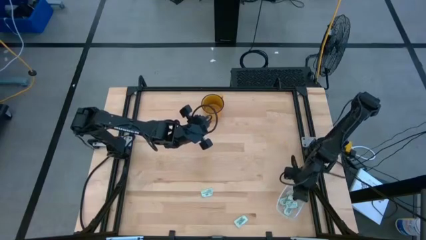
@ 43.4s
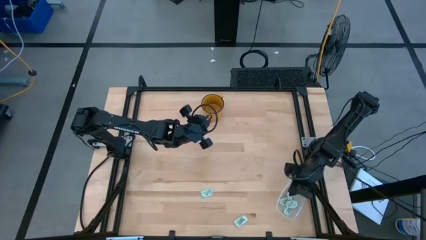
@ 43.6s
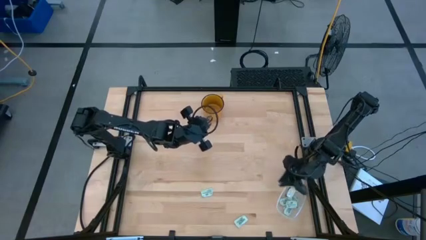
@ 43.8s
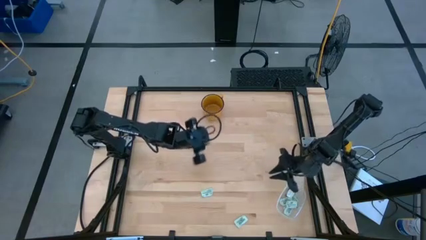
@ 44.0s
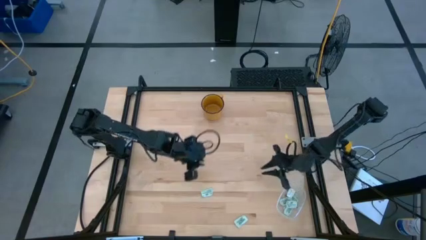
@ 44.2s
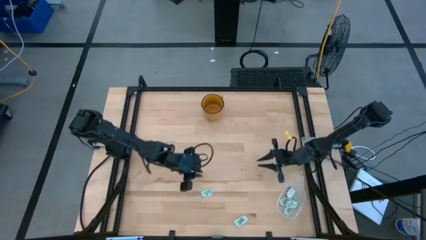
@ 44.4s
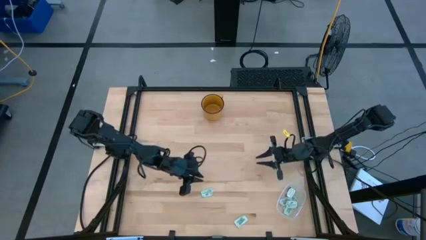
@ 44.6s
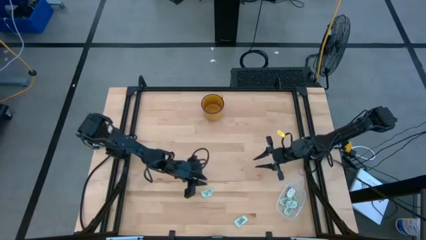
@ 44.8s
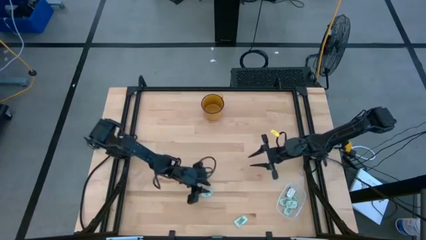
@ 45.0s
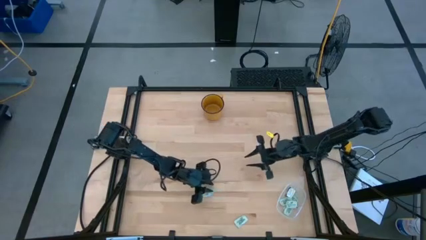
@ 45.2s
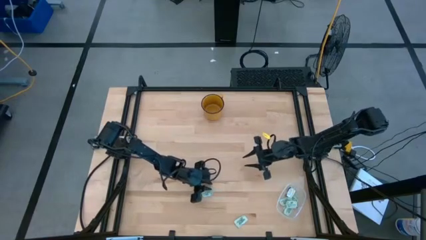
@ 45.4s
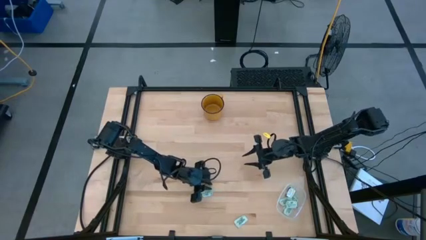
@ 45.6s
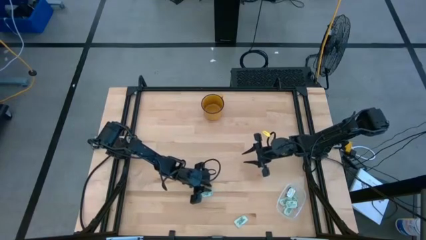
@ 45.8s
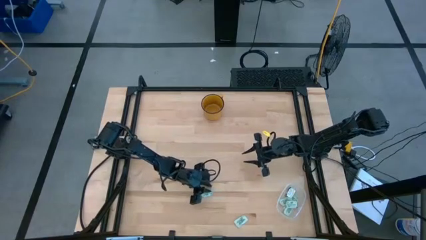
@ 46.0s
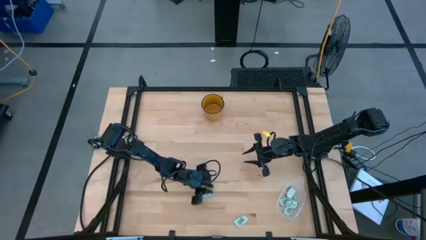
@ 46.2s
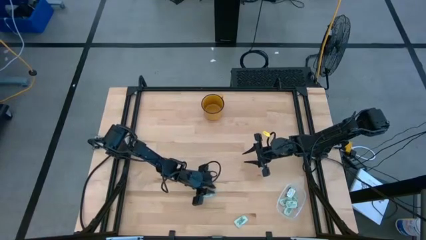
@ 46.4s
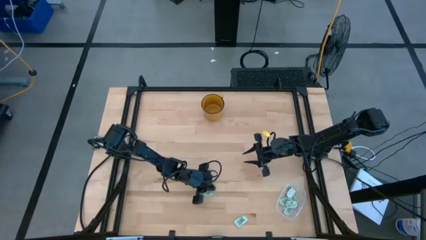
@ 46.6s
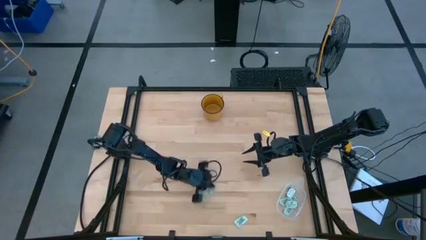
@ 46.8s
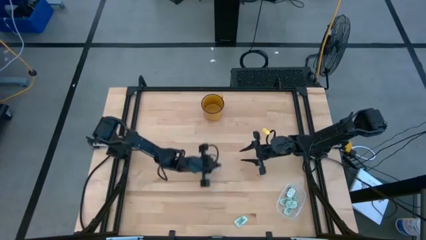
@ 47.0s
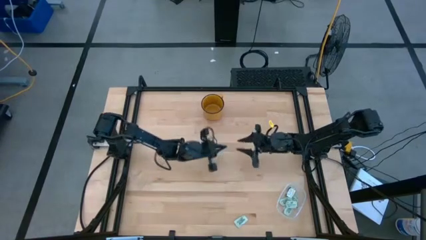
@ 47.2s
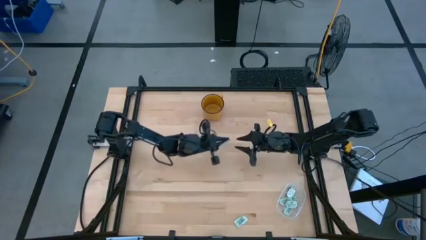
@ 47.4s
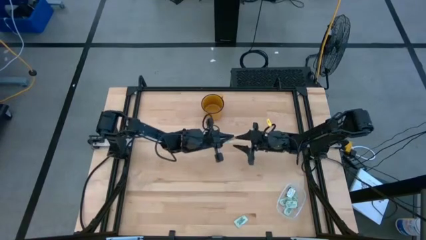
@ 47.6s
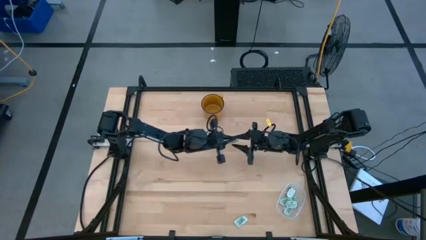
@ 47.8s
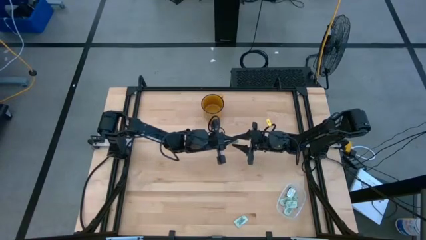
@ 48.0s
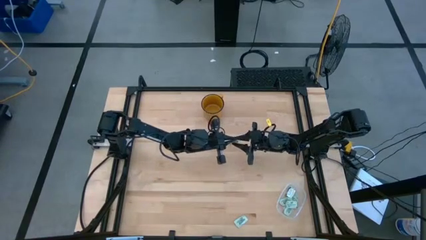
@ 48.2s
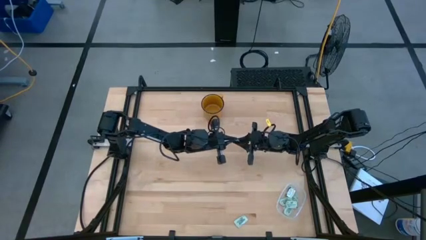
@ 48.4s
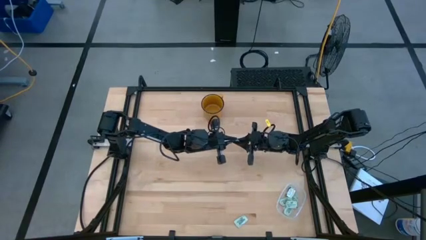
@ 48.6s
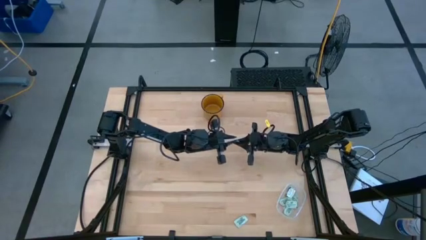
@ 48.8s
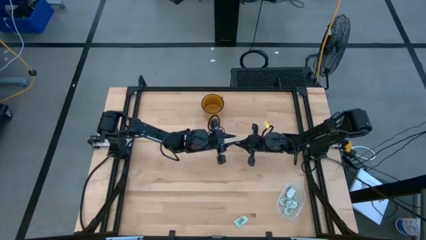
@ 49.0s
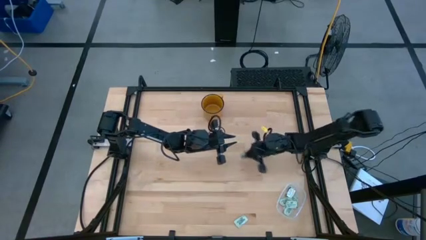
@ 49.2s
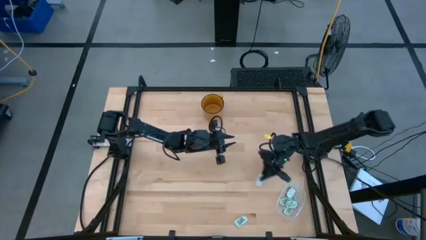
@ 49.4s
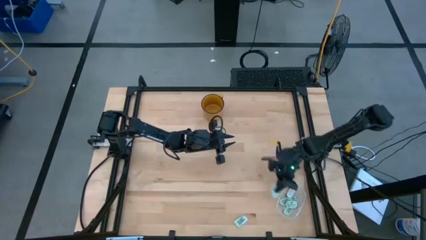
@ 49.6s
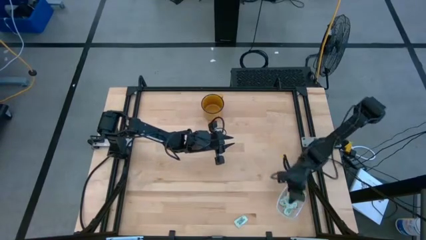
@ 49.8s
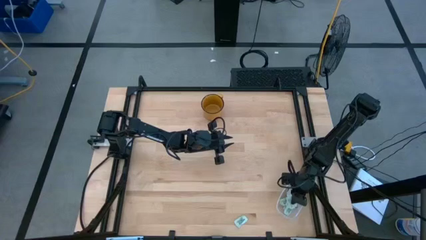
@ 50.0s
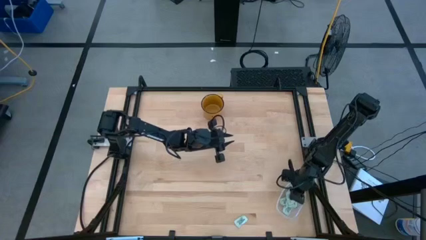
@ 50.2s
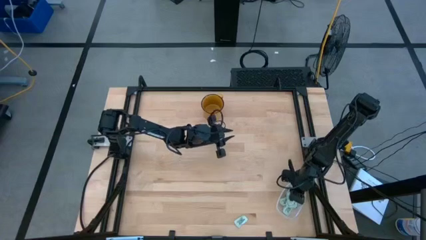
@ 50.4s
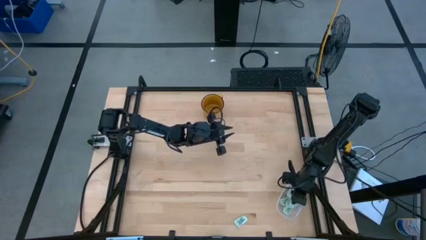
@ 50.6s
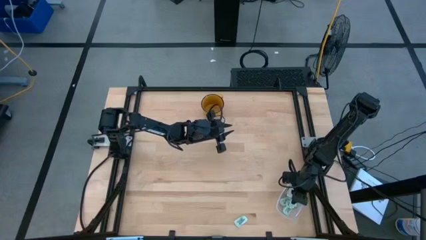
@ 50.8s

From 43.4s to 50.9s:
Task: Pick and place Stevia / Truvia into bins
Put the stevia packet into the transparent bin

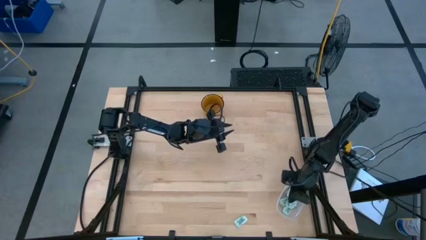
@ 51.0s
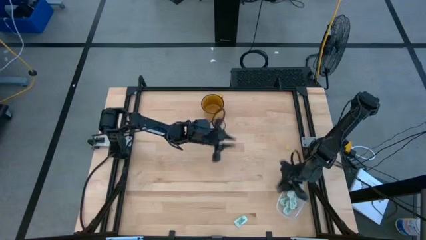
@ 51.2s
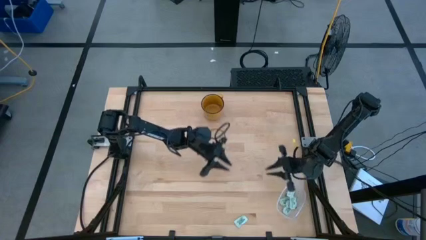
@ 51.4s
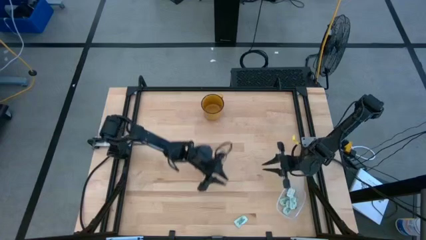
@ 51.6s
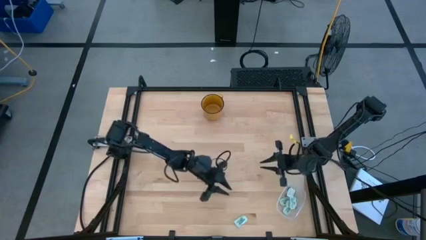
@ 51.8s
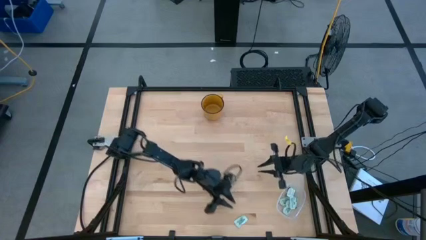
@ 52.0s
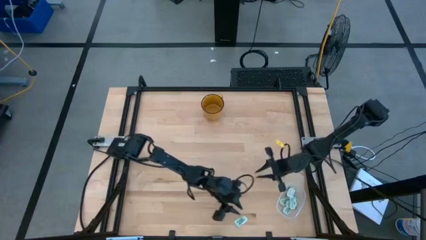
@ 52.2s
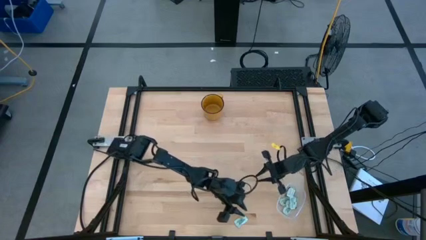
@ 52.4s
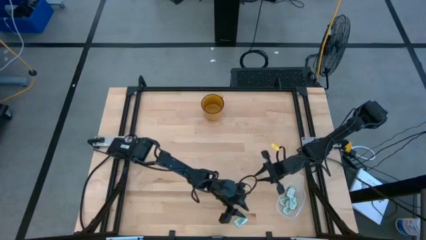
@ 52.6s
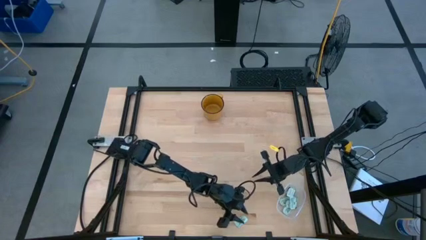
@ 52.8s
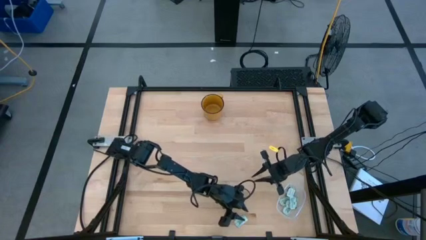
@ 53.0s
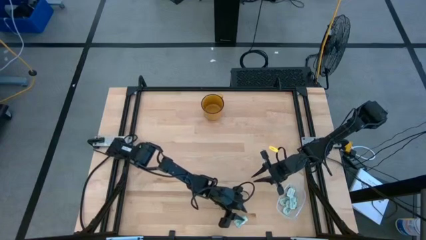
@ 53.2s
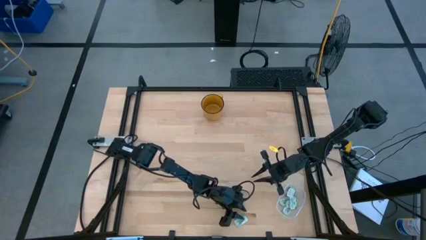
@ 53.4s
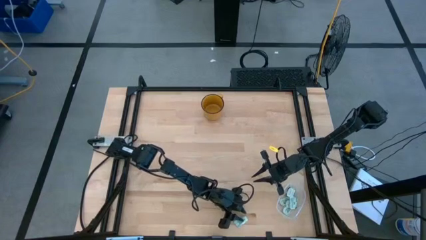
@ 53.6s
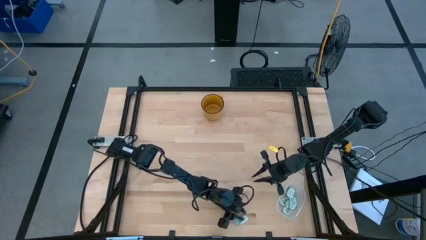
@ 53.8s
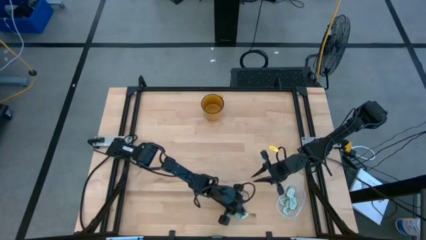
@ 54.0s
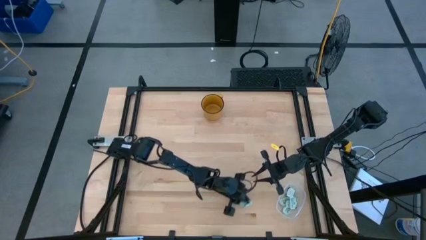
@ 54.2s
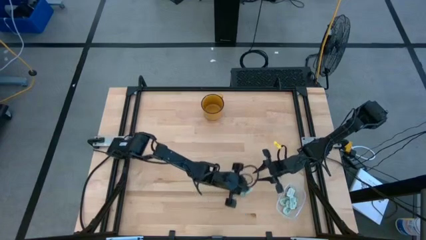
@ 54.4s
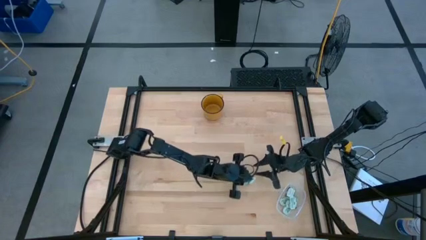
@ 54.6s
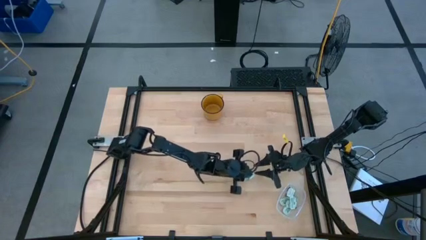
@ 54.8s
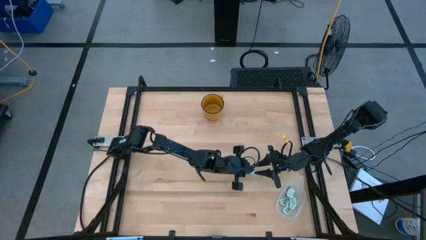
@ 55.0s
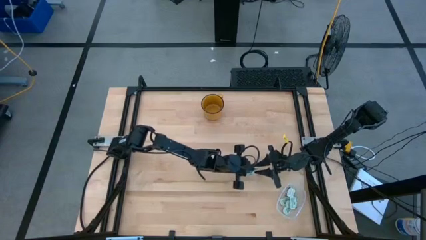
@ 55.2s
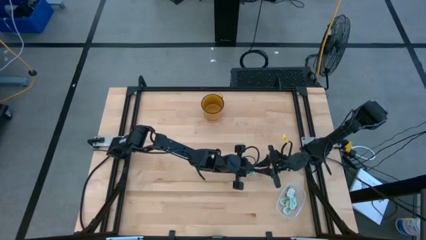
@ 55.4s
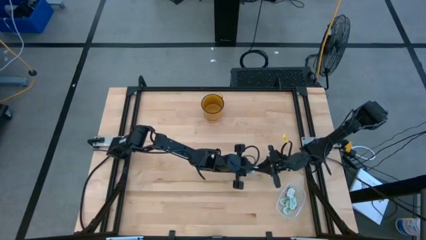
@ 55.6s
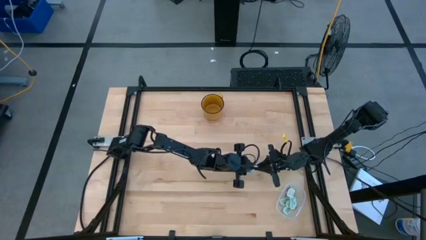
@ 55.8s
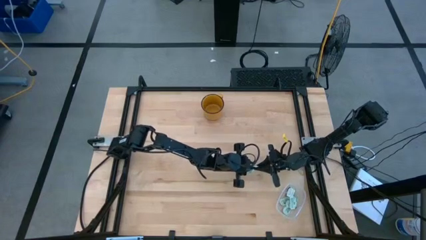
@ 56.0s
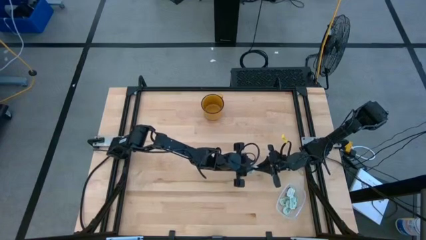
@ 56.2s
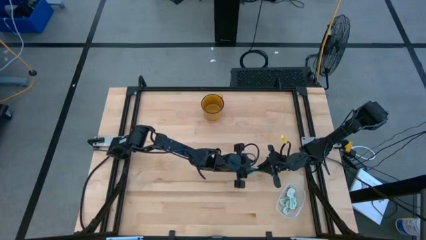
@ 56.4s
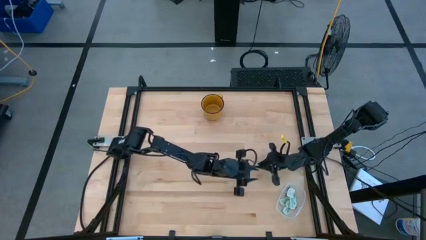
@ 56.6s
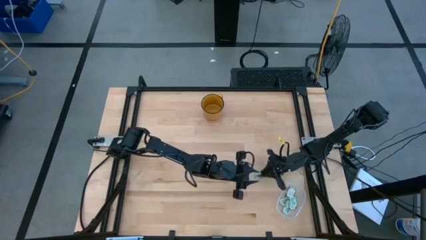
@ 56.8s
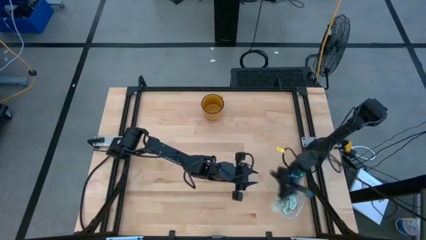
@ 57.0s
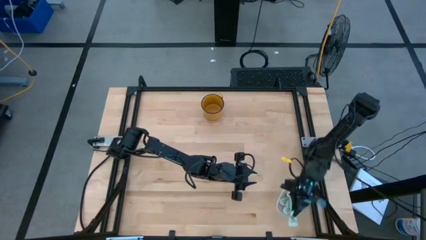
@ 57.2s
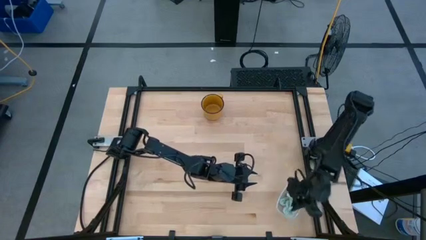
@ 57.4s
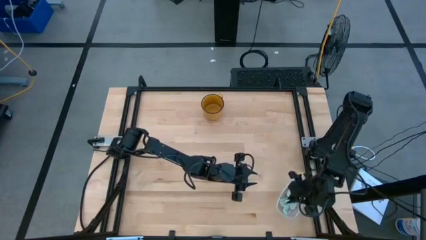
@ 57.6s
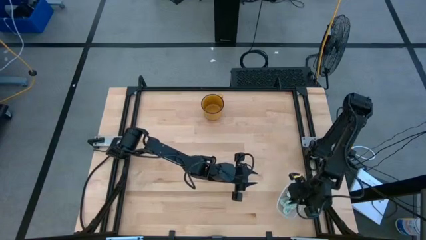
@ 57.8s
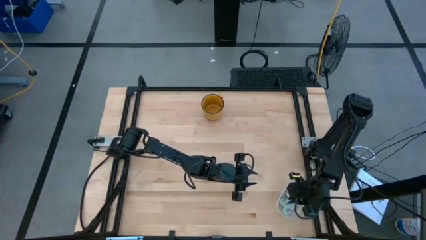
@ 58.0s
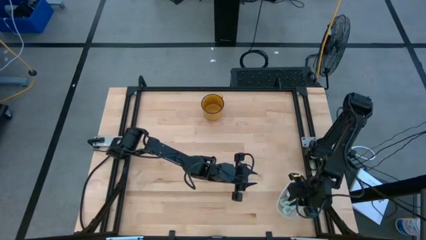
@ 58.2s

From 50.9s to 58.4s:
Put the stevia packet into the transparent bin

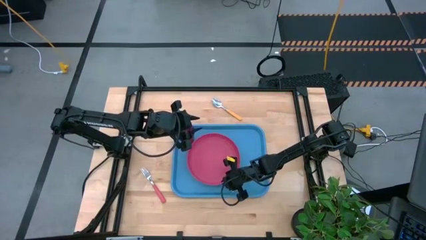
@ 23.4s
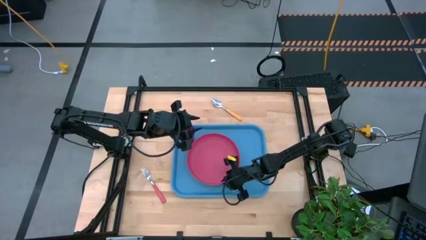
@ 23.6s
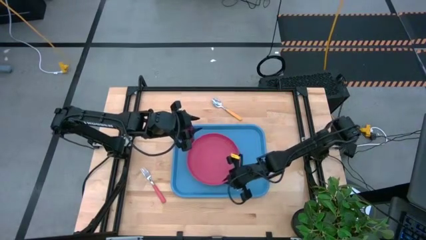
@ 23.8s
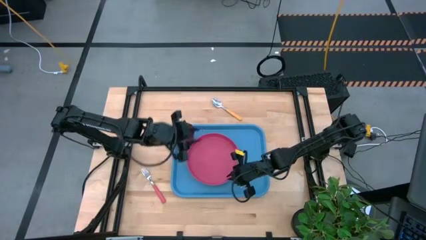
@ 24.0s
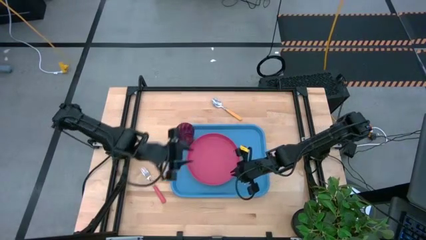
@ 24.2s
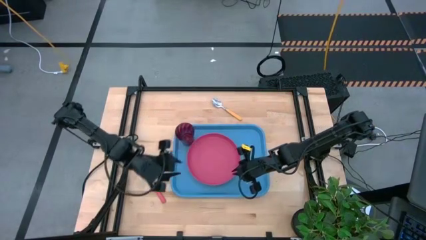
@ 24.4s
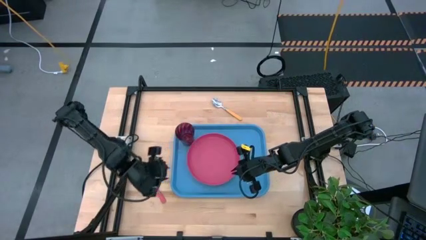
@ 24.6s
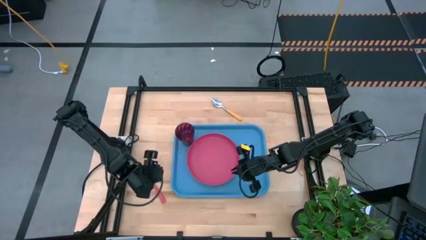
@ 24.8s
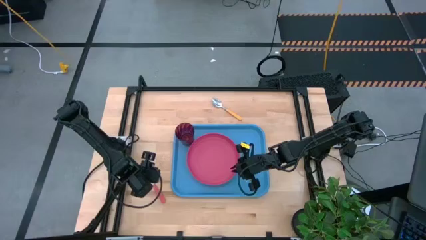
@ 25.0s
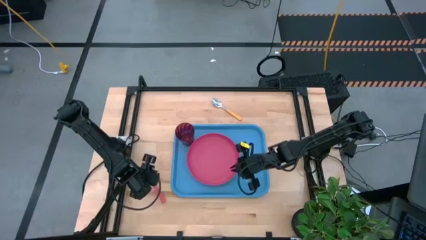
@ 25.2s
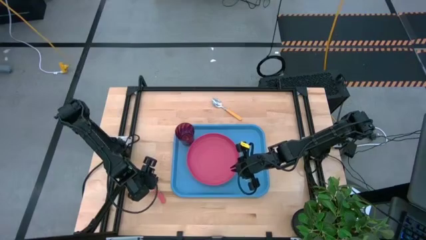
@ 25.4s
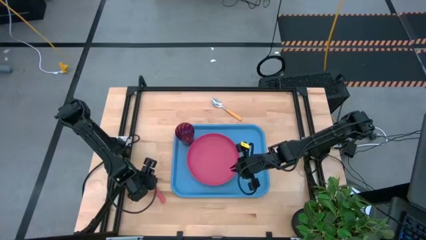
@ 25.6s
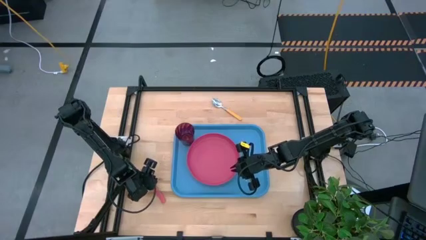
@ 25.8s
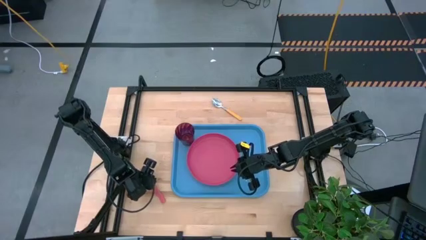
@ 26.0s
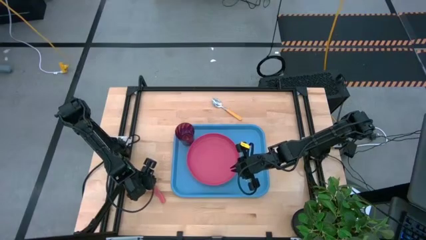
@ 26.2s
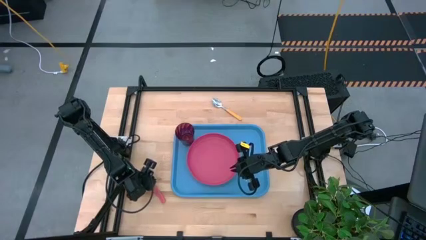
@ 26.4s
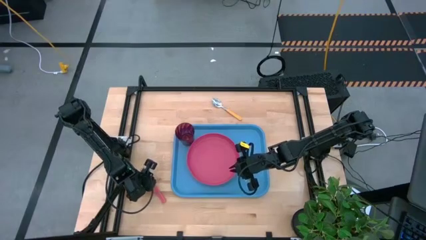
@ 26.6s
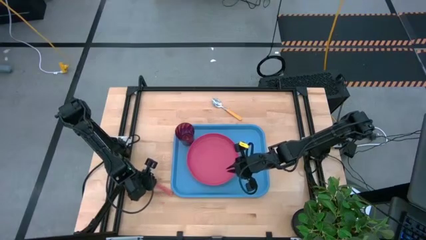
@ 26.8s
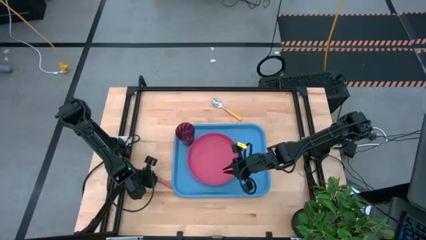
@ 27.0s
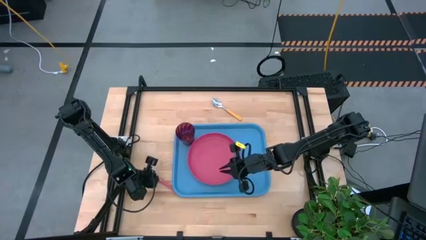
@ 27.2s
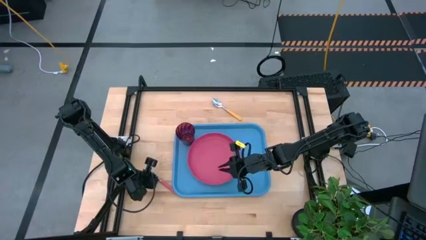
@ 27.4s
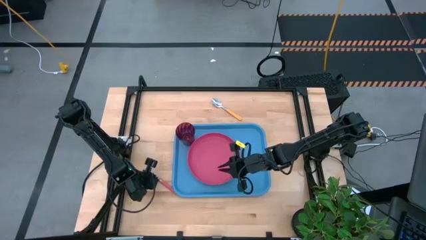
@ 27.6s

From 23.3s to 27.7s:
Task: Pick and place plate/cup/fork/spoon on tray
Put the pink fork on the blue tray to the right of the pink plate
